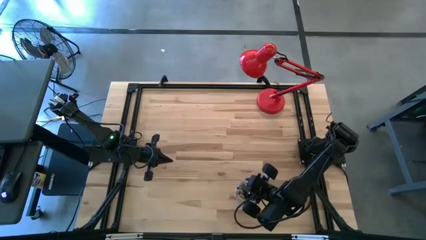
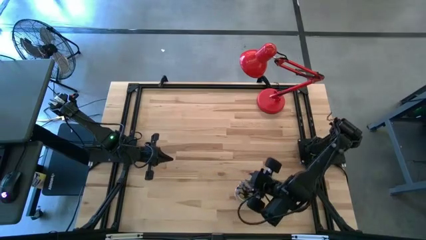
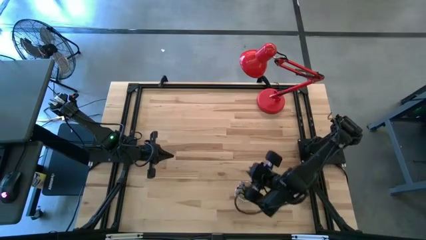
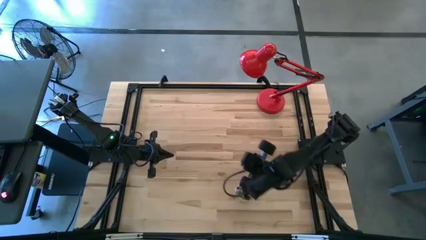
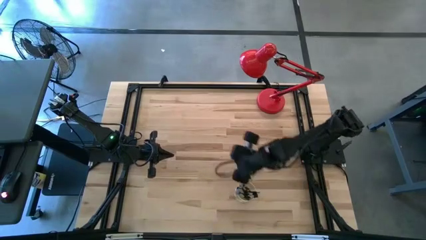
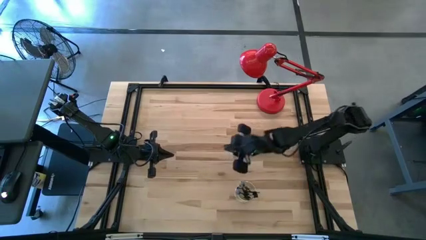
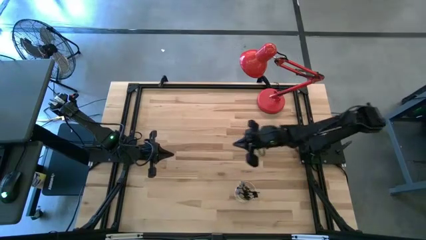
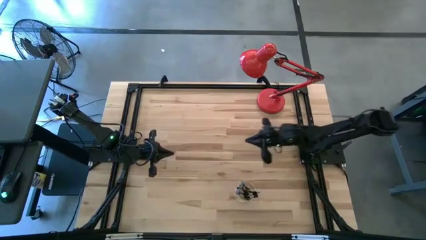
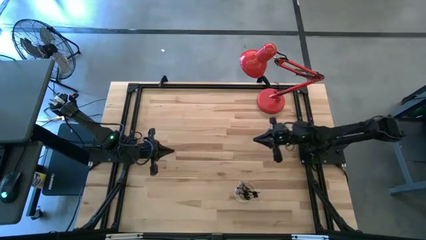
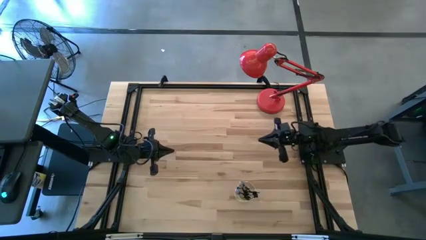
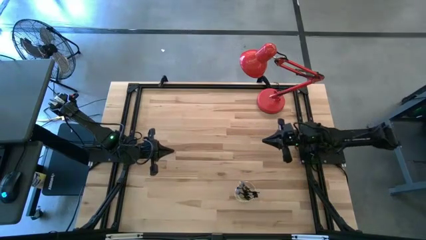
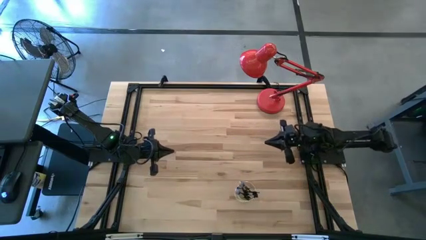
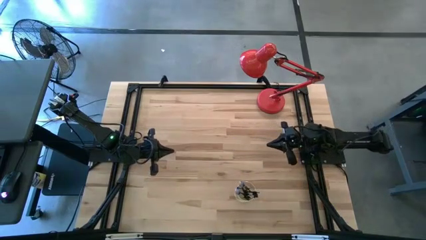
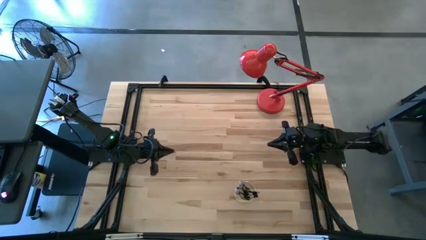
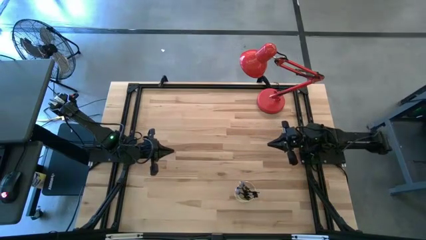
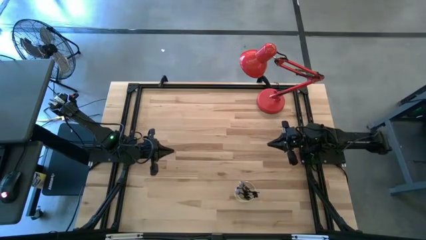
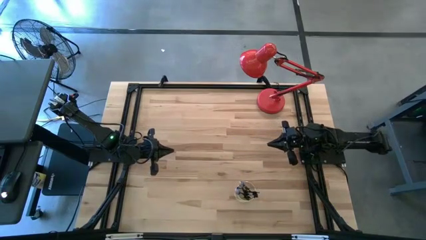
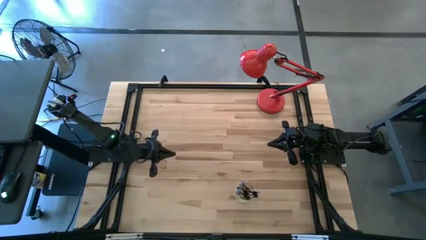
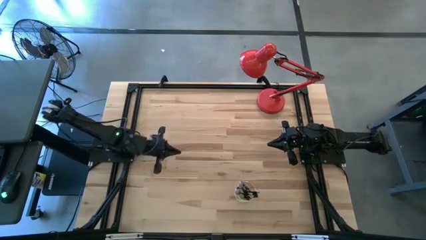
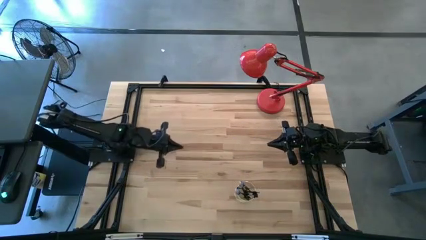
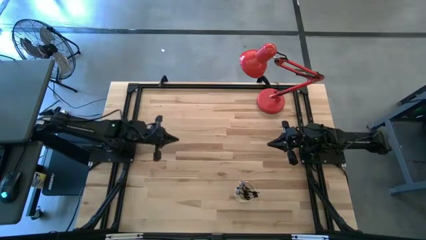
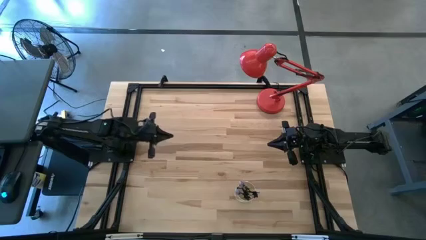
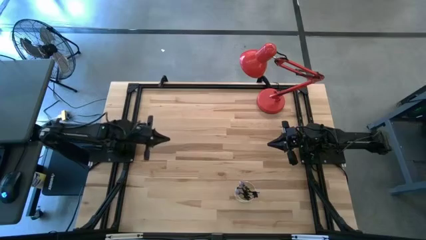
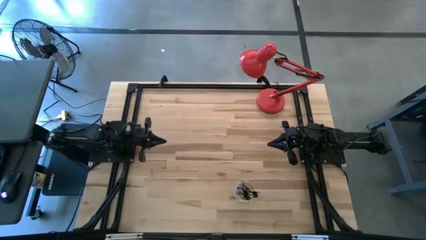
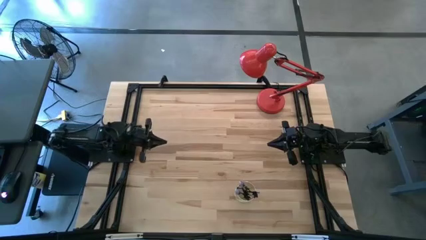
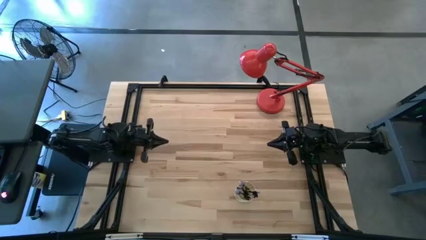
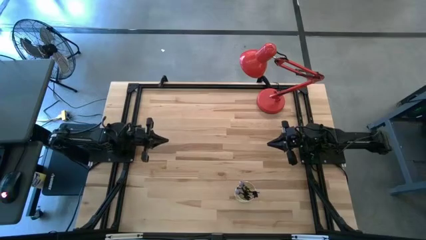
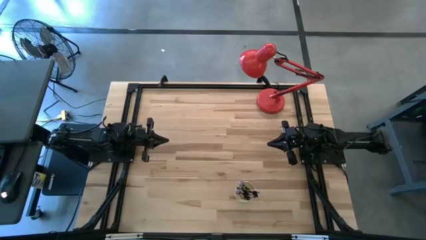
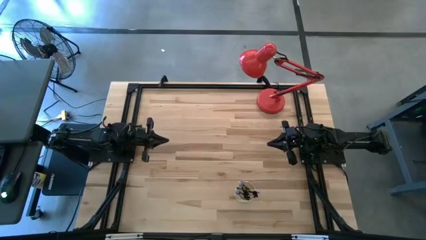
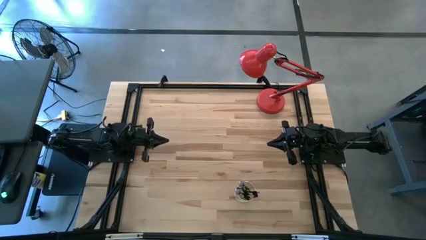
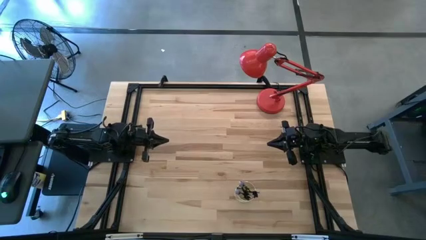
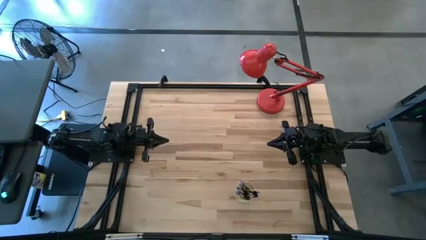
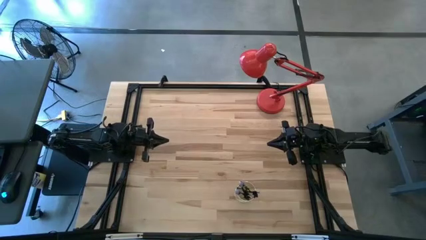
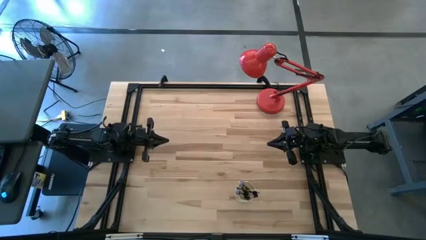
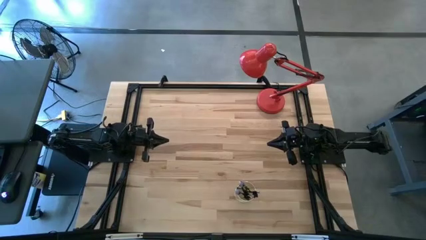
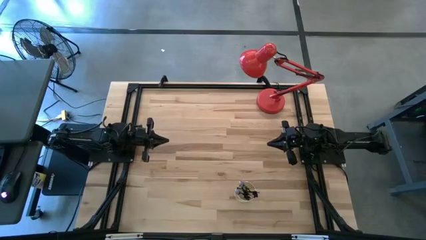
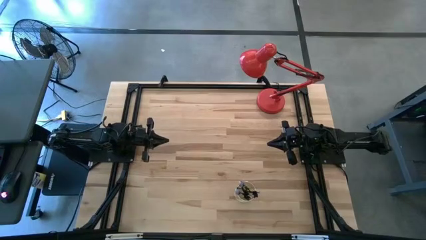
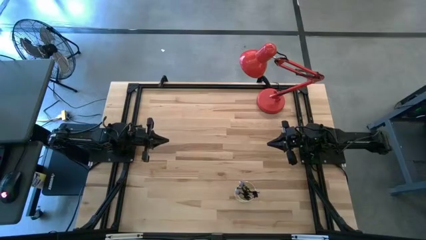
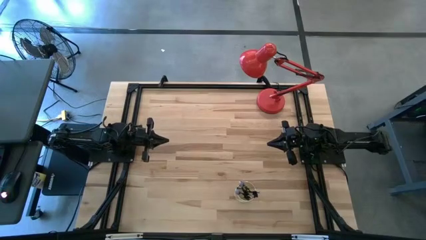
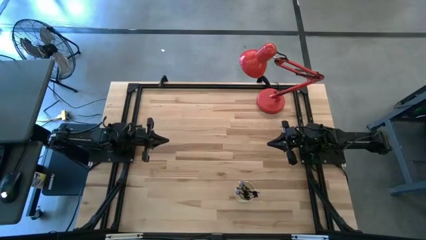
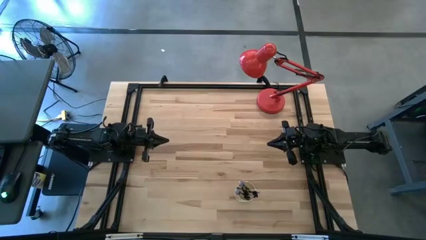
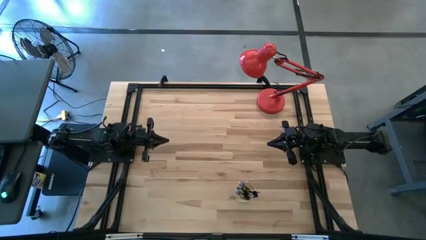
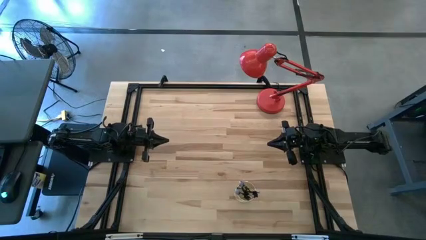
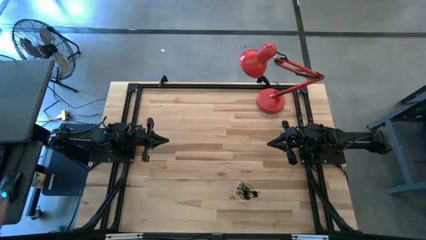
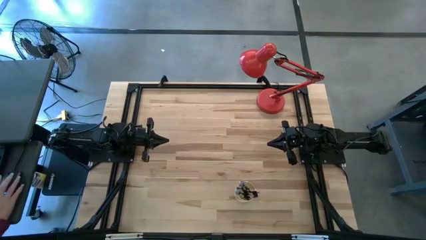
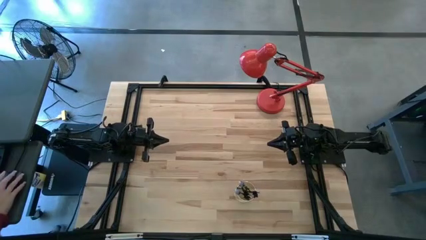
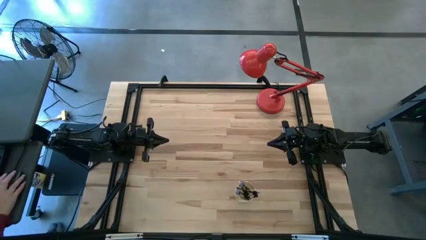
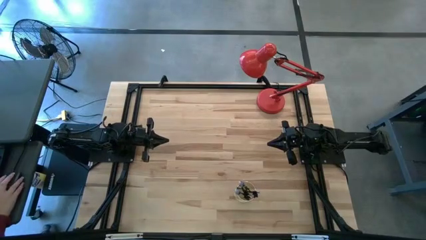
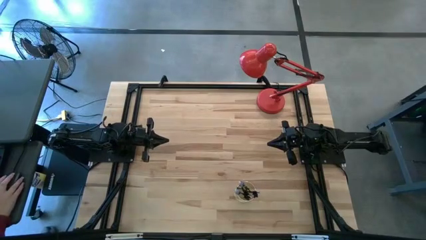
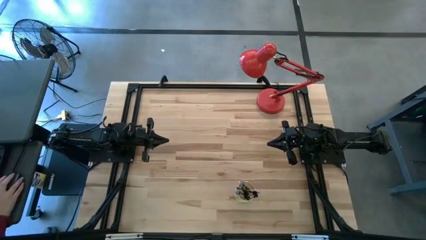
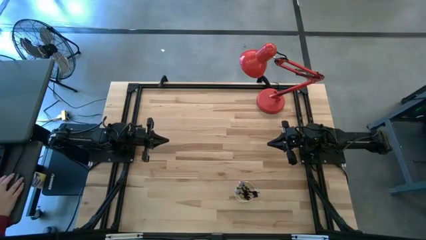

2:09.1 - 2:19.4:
Task: Pick & Place Makeup Brushes
Return to Home Position

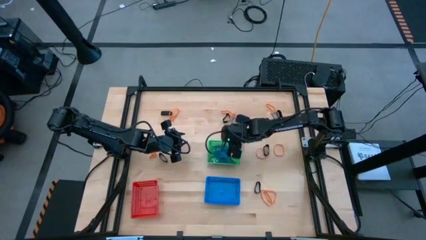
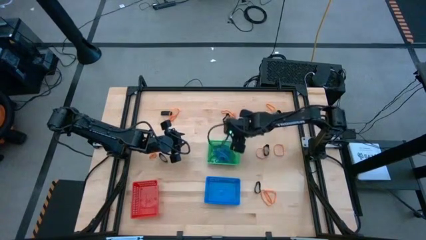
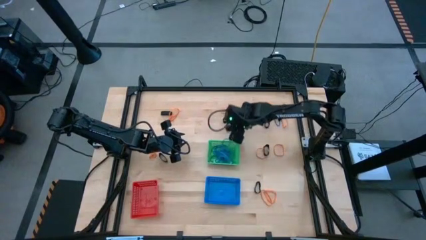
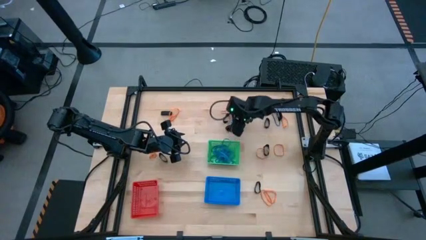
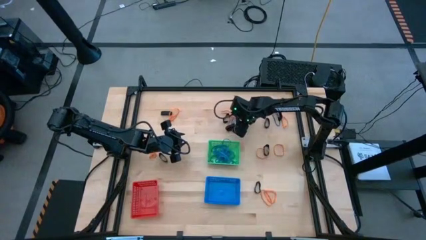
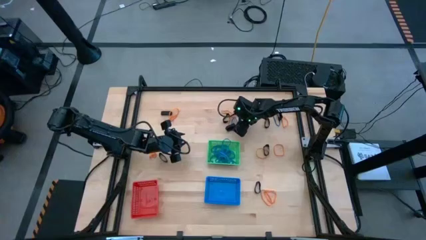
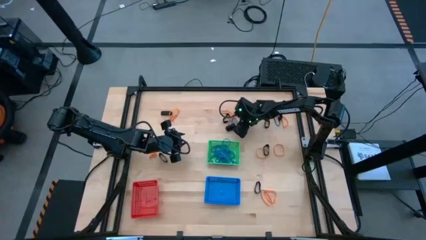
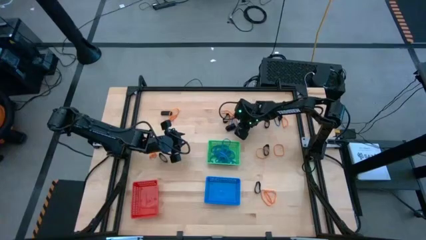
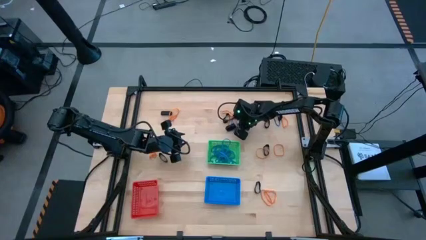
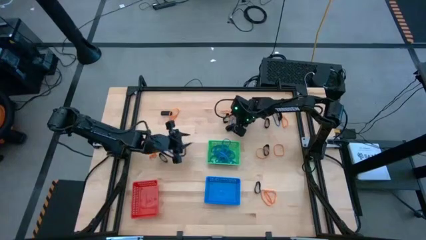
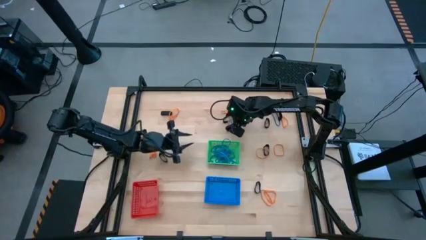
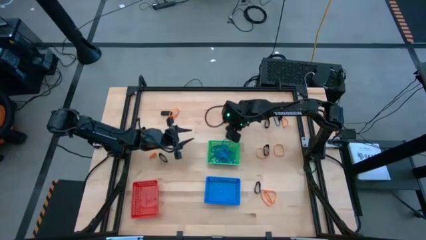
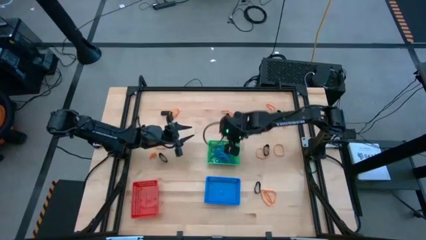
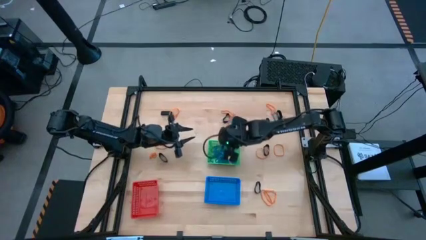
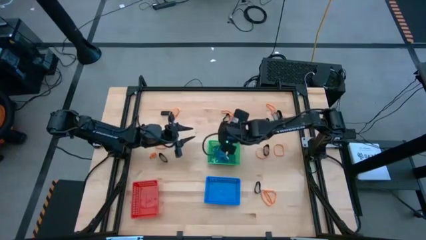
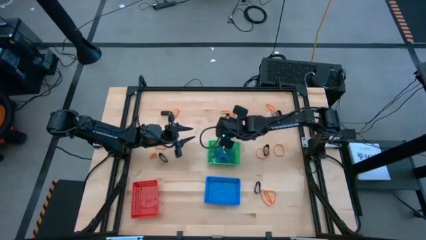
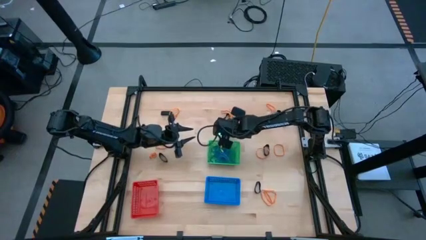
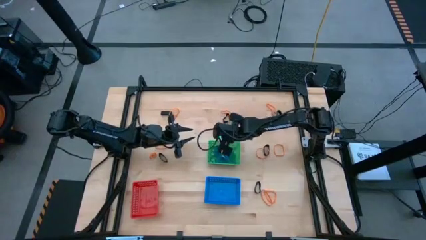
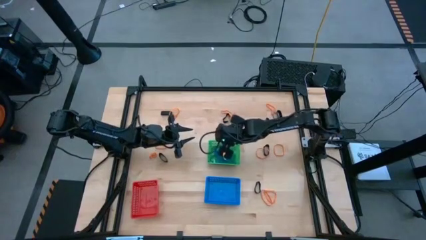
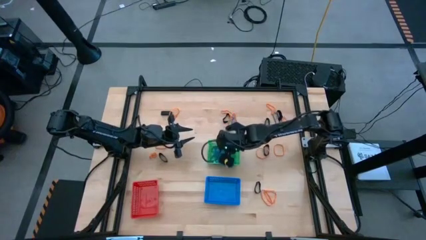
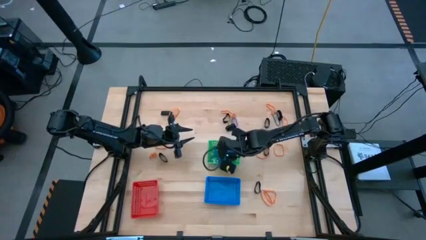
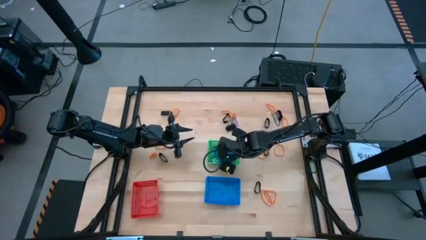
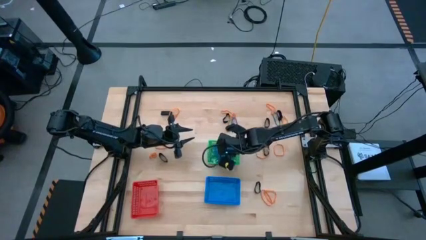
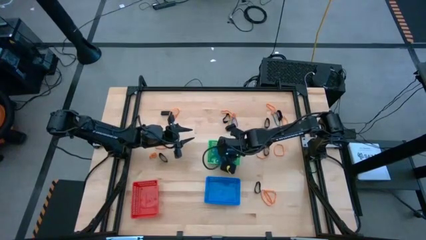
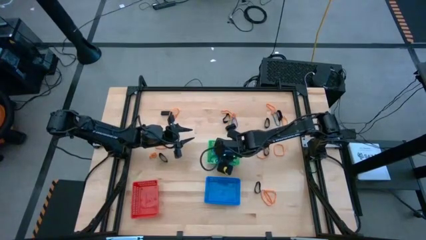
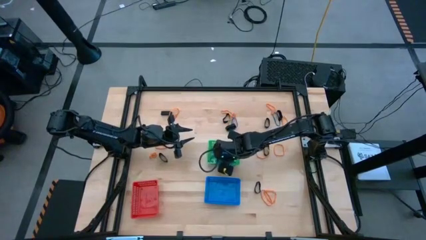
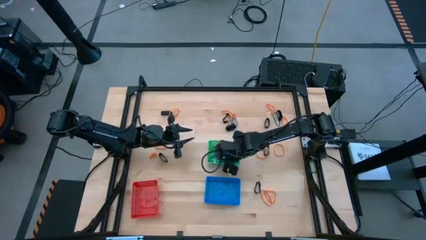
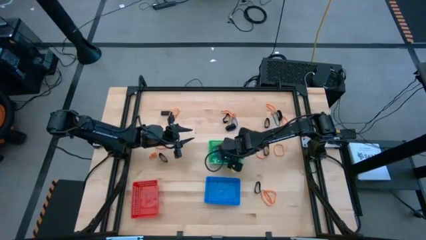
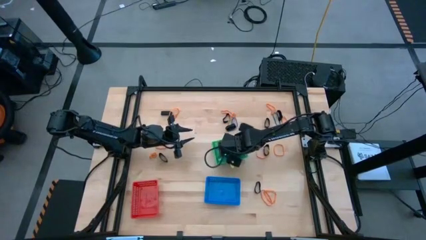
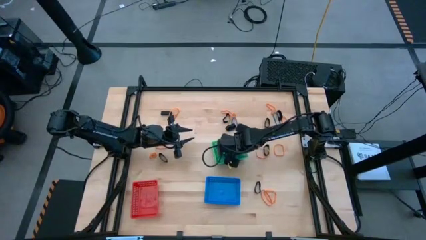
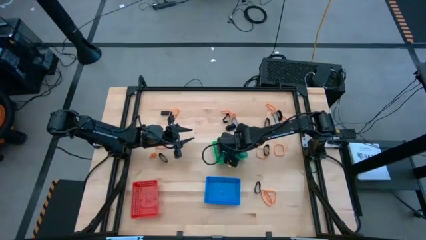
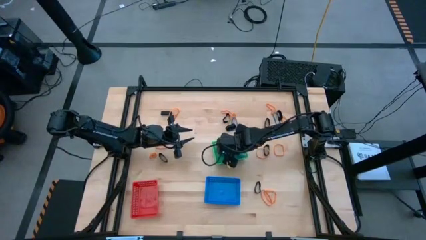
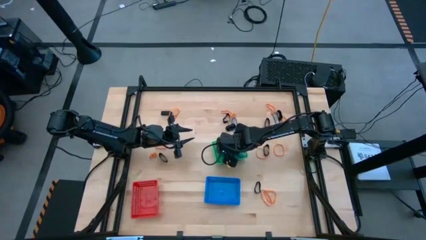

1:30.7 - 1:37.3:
Task: Sort rubber bands into baskets
Put the blue rubberband into the green bin
